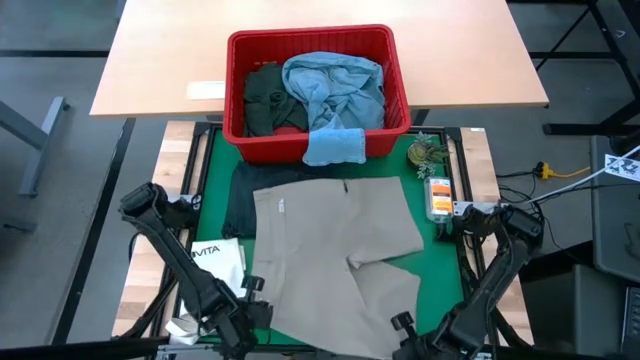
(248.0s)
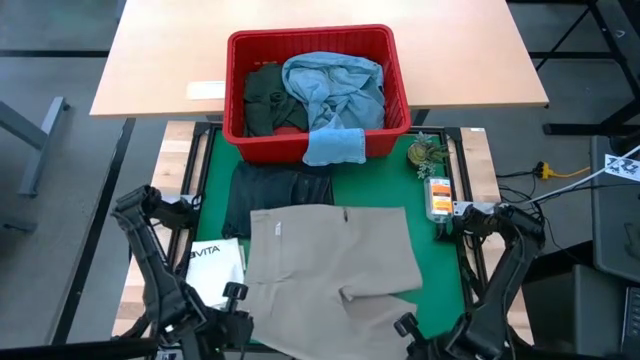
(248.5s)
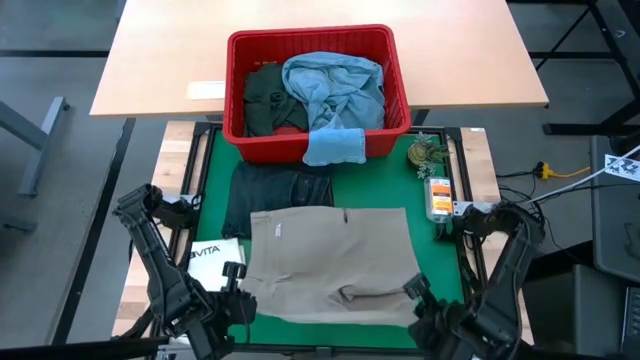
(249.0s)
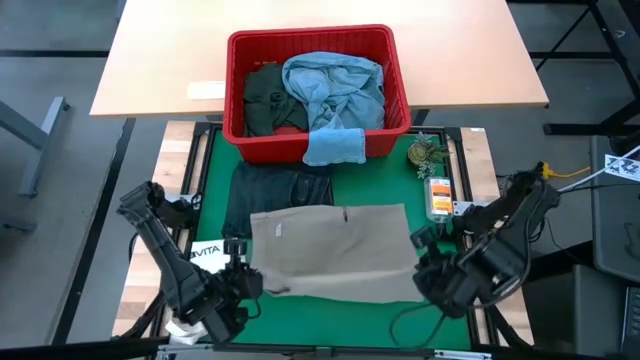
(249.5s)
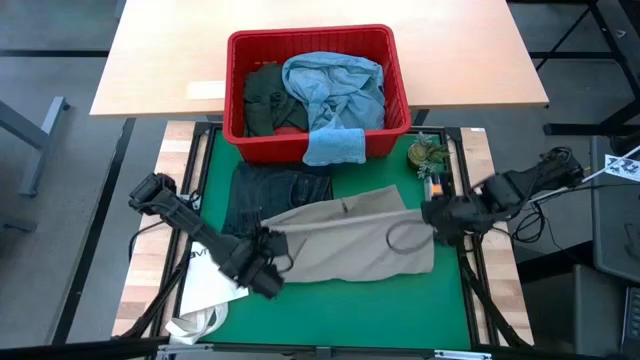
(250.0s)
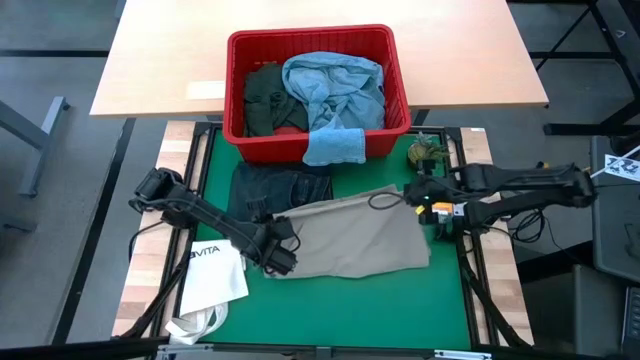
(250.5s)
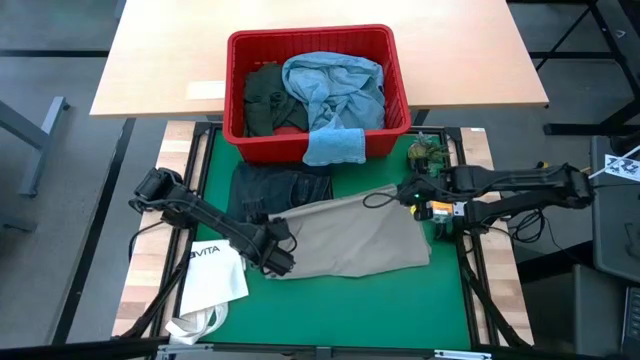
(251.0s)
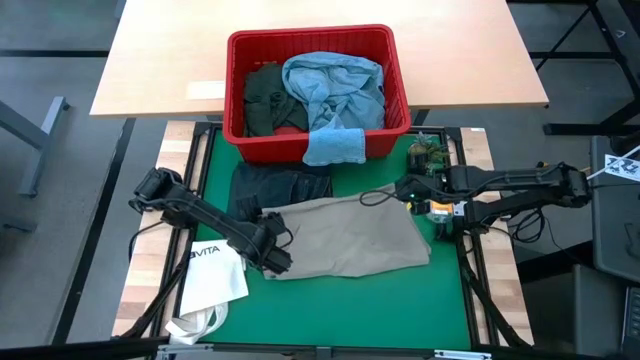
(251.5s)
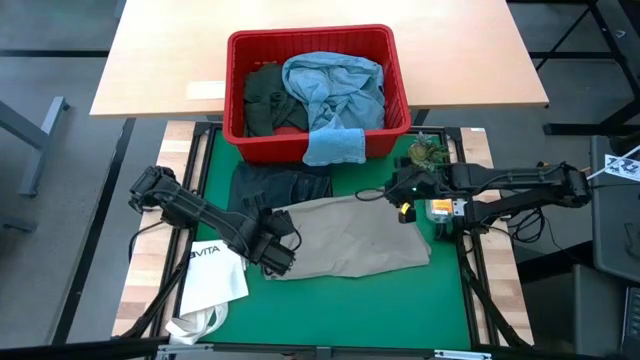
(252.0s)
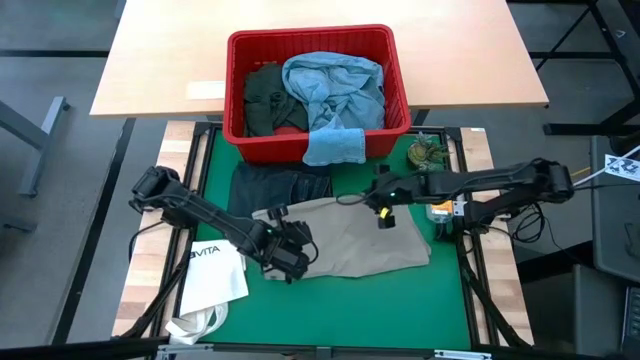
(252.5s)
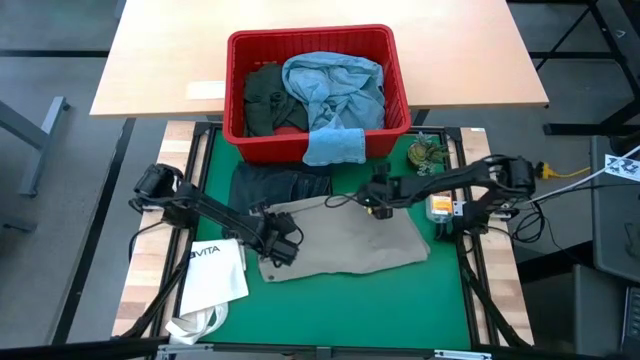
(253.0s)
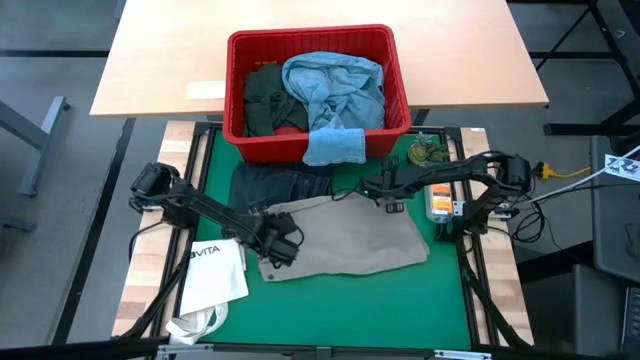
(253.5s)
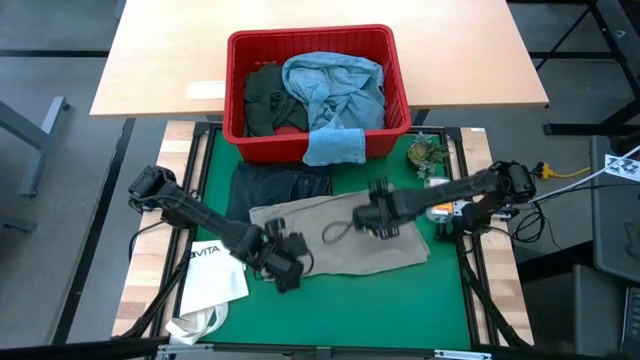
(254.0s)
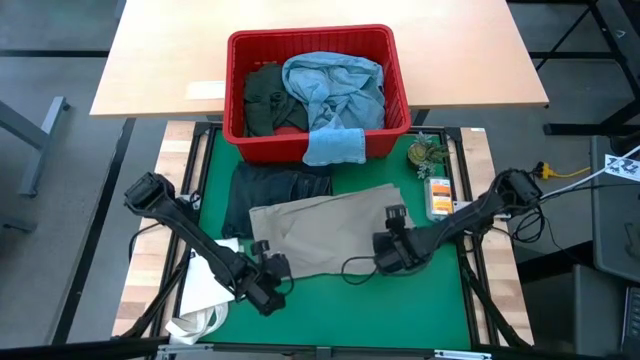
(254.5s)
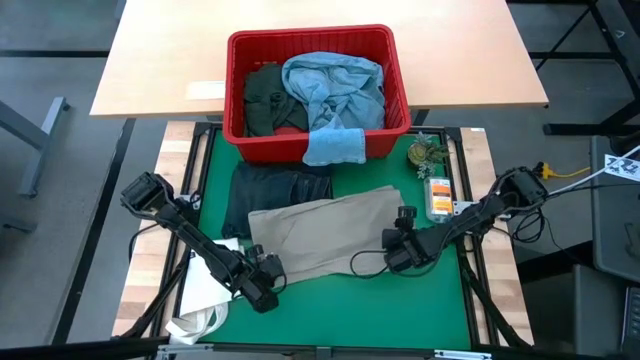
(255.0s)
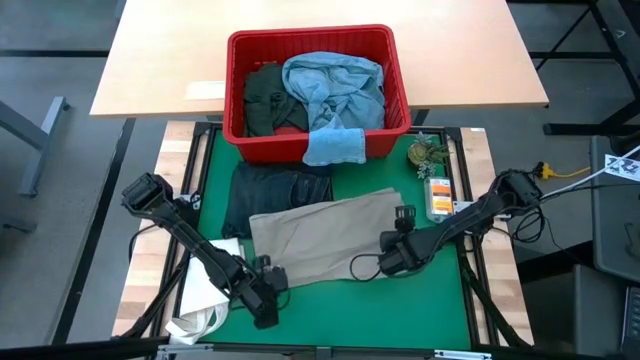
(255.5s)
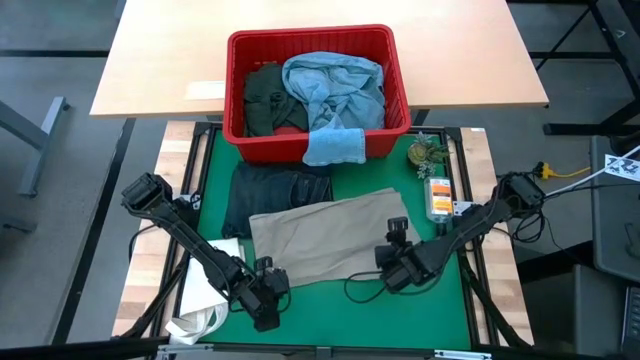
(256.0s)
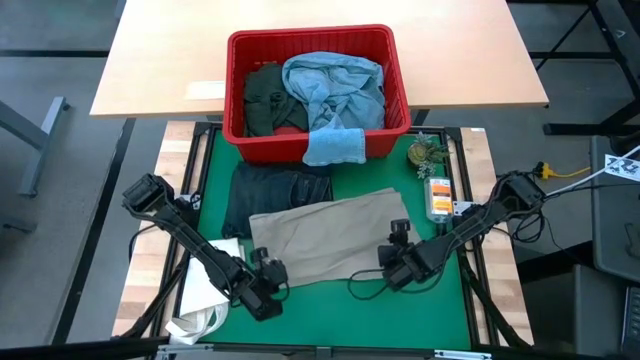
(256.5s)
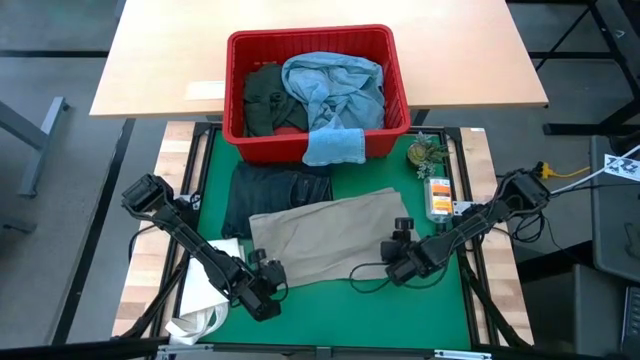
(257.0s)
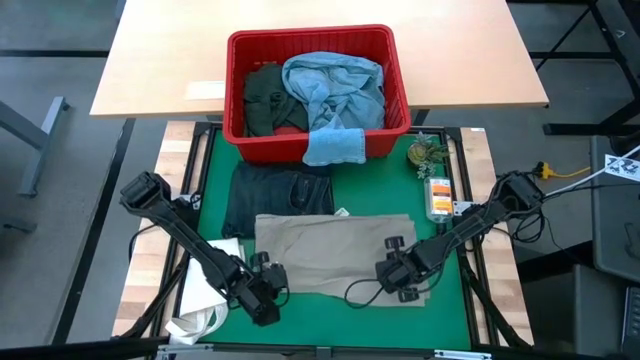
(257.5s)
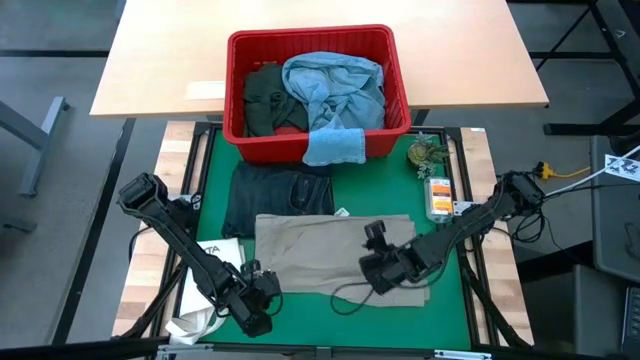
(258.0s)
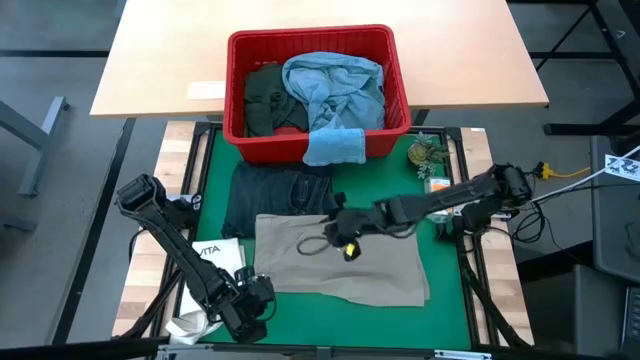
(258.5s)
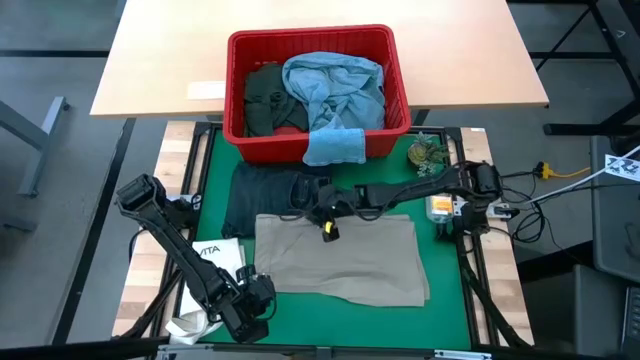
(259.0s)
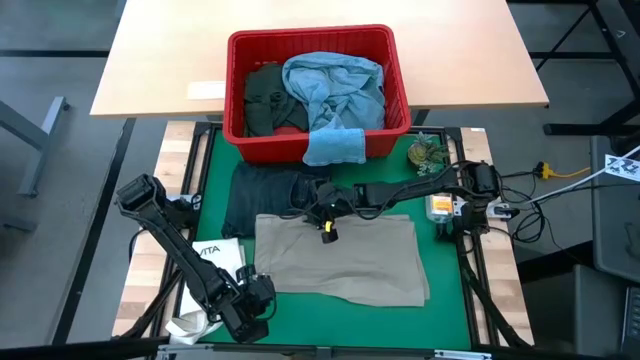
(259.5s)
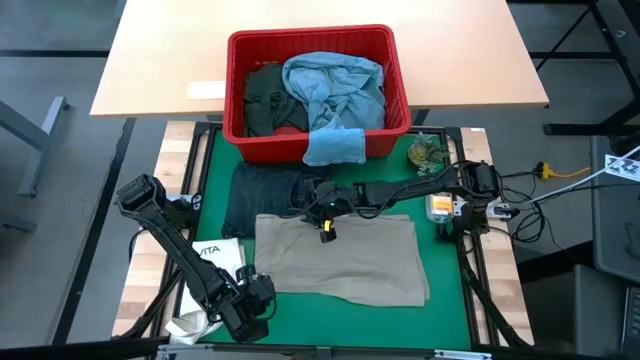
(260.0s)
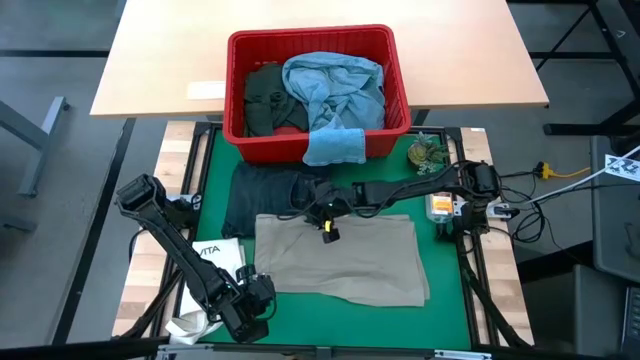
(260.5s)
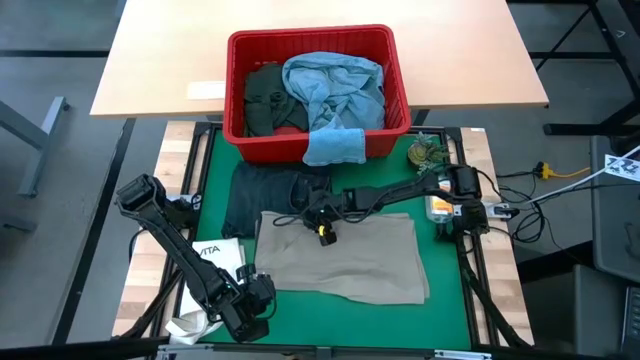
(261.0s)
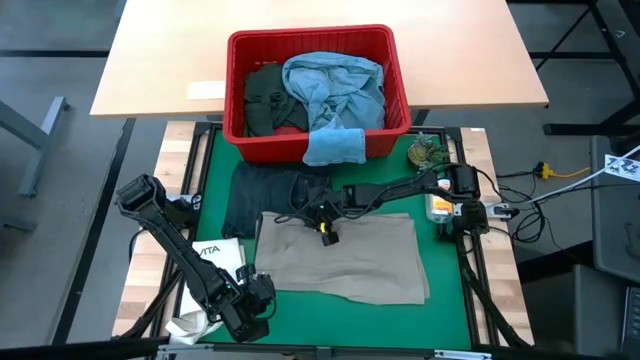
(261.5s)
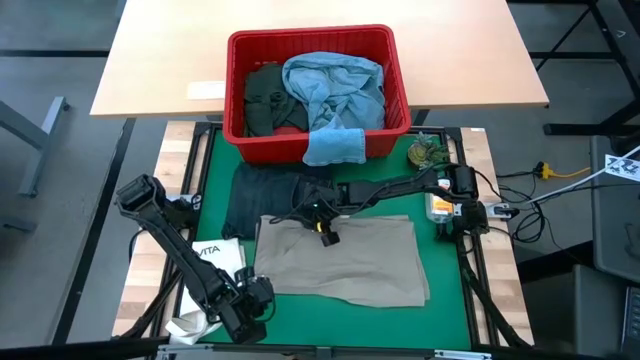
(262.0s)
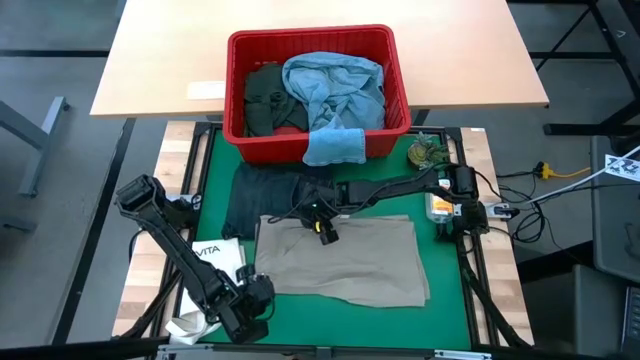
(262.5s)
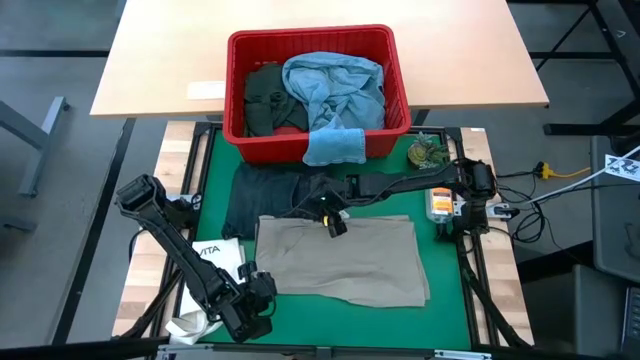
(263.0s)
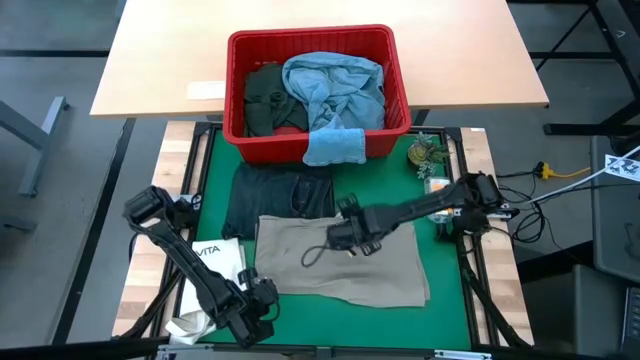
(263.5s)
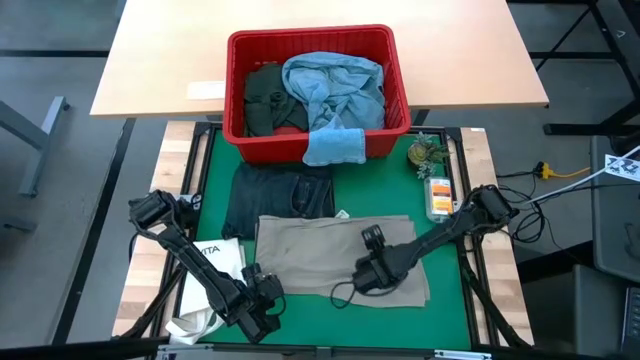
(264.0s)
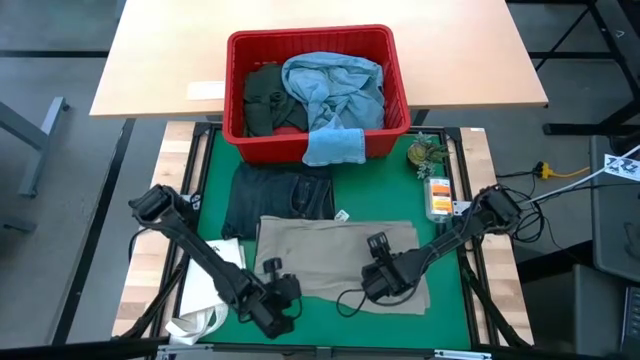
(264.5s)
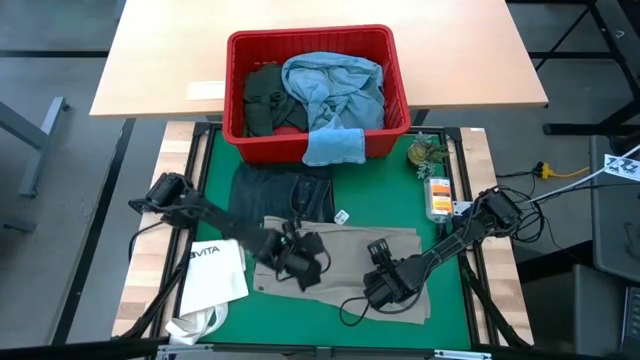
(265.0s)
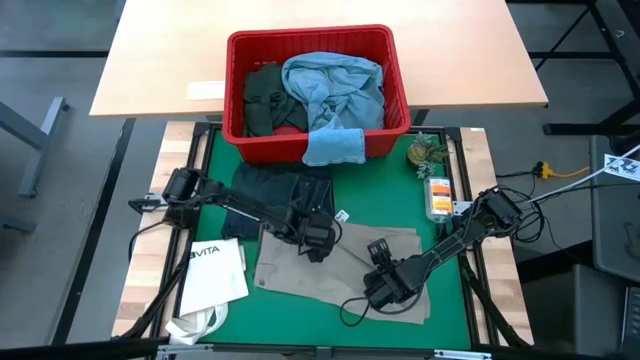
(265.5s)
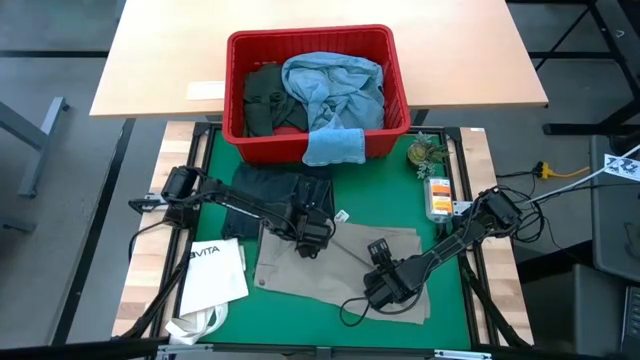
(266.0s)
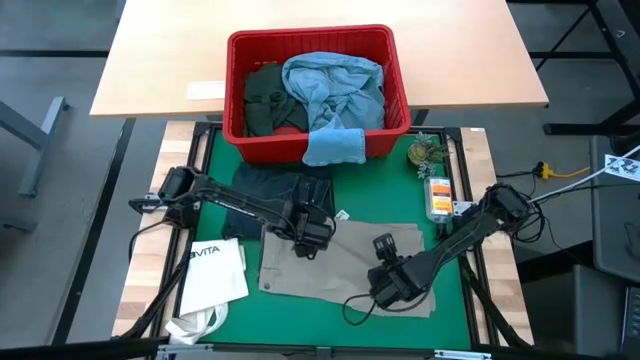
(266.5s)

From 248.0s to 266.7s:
Task: Fold Laundry from Bin
Fold the brown shorts

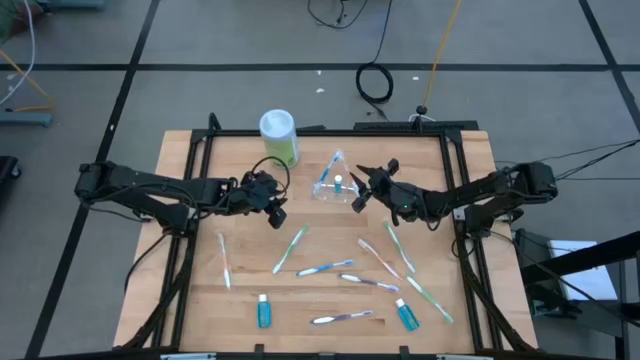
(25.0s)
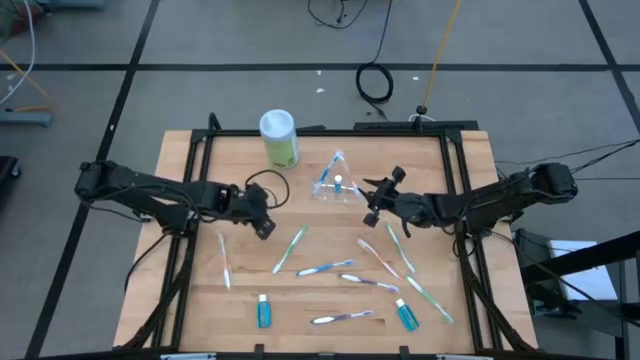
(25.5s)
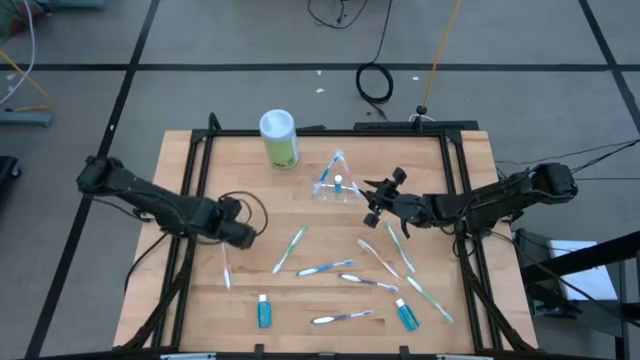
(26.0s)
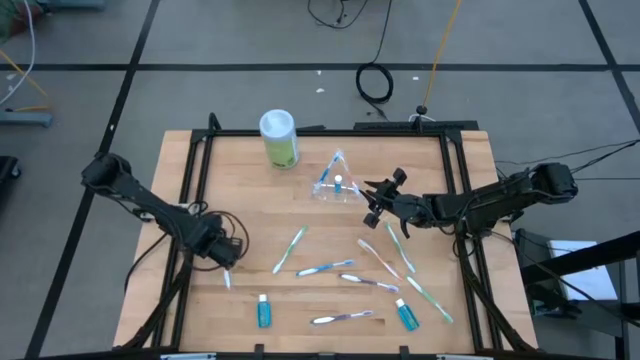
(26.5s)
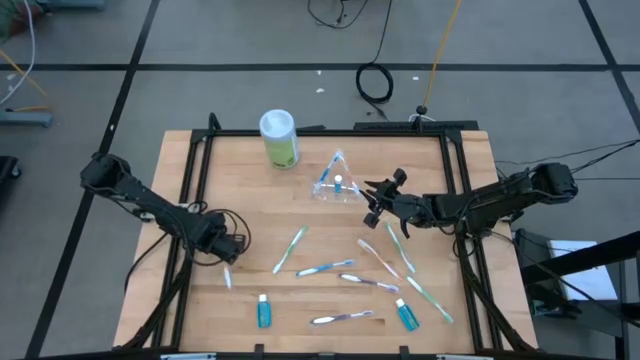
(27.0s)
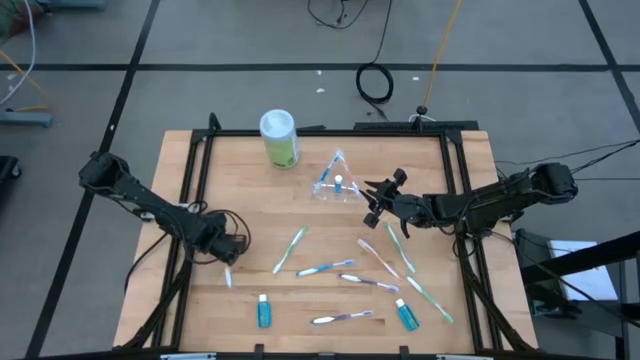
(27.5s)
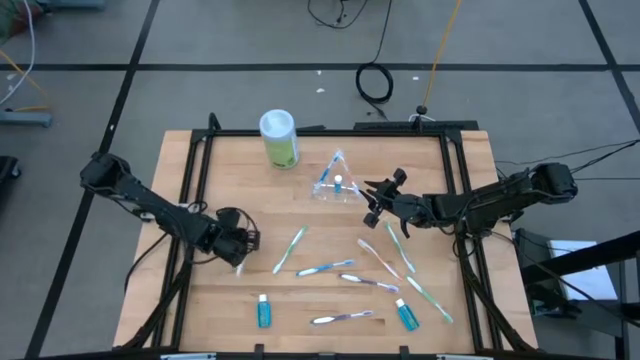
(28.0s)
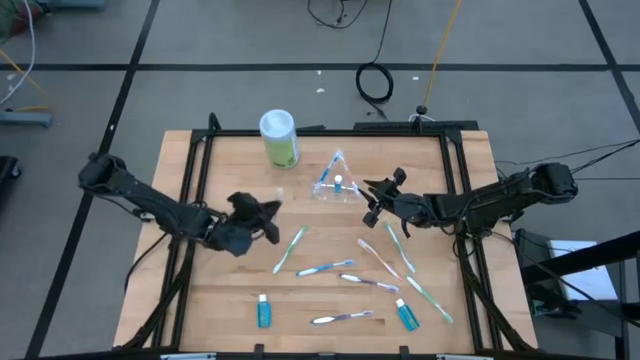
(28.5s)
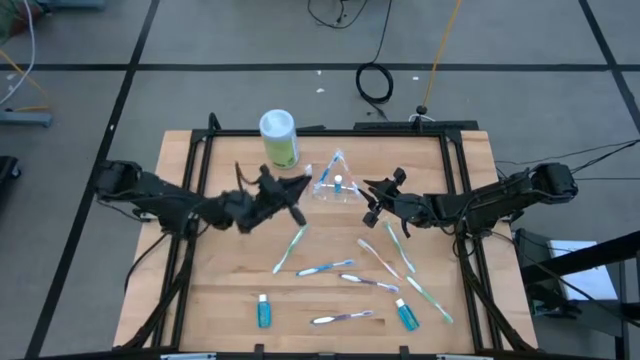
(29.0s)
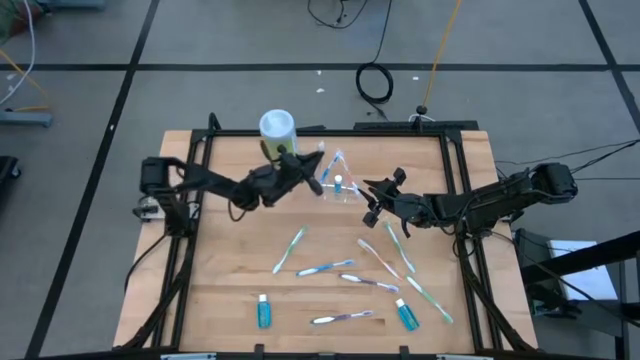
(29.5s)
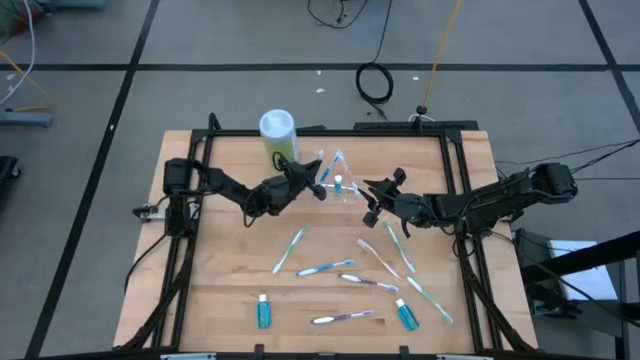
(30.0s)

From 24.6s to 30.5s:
Task: Pick & Place toothbrushing station
Put the left orange toothbrush into the transparent organizer
